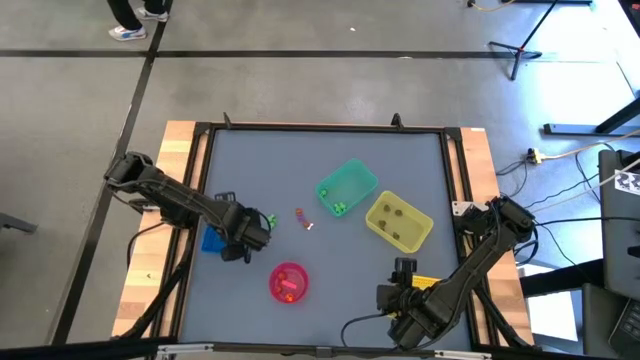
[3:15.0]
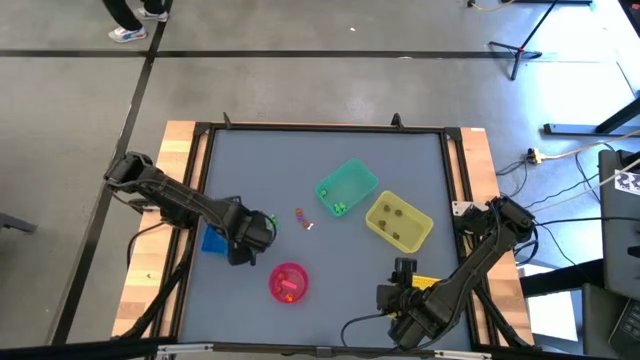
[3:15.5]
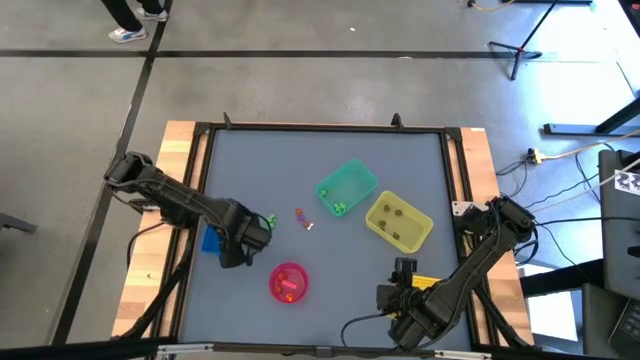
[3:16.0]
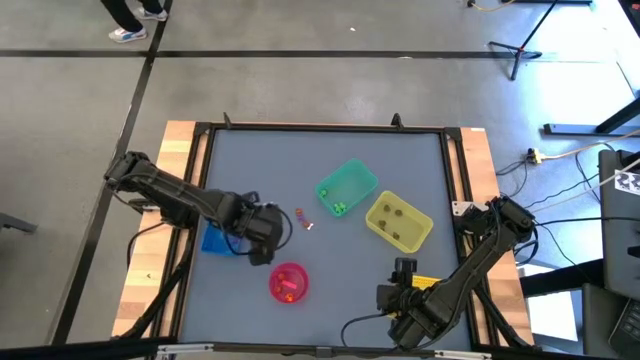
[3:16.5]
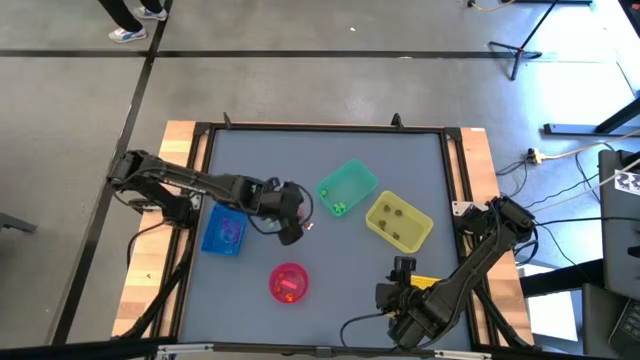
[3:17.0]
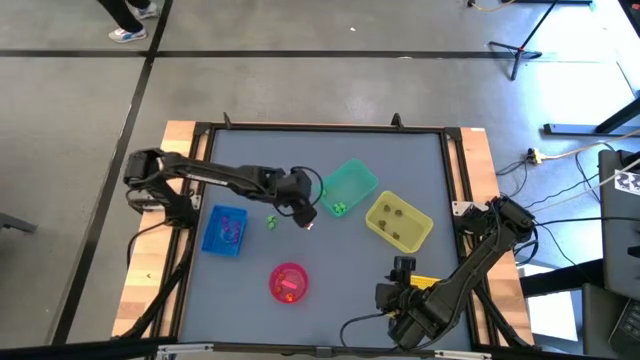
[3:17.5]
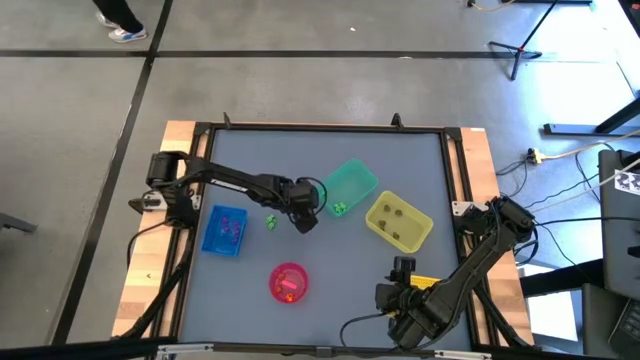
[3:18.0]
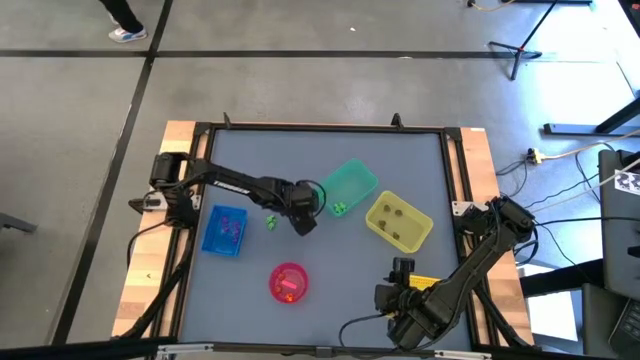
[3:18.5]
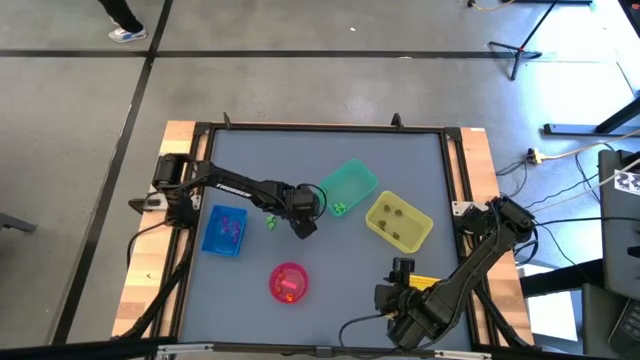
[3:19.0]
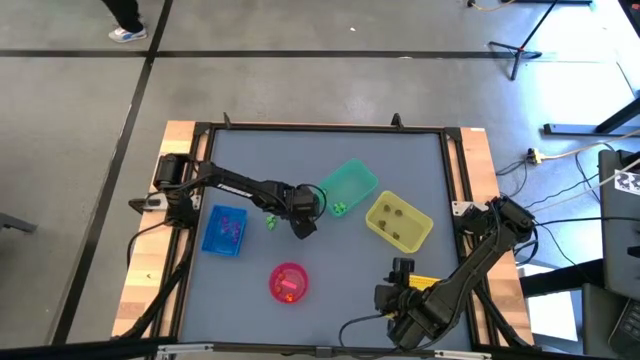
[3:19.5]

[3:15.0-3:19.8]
Task: Sort Halloween decoration
Put the orange pumpkin toy into the pink bin

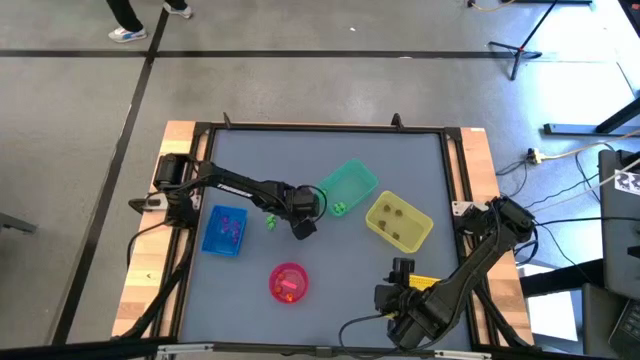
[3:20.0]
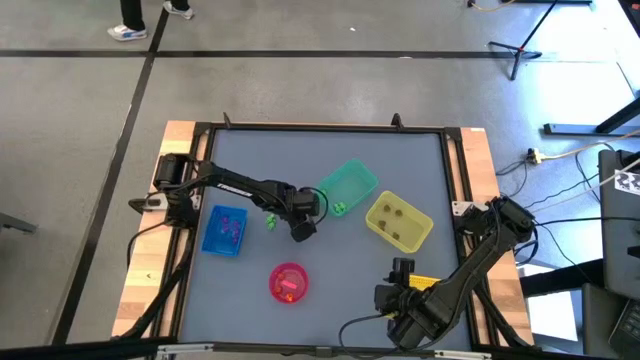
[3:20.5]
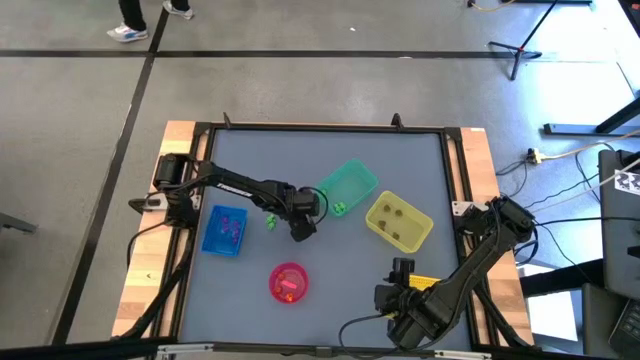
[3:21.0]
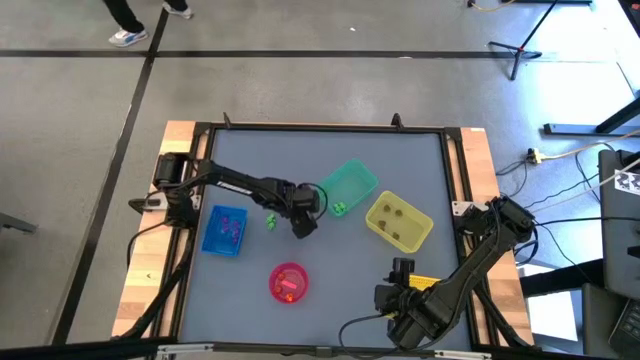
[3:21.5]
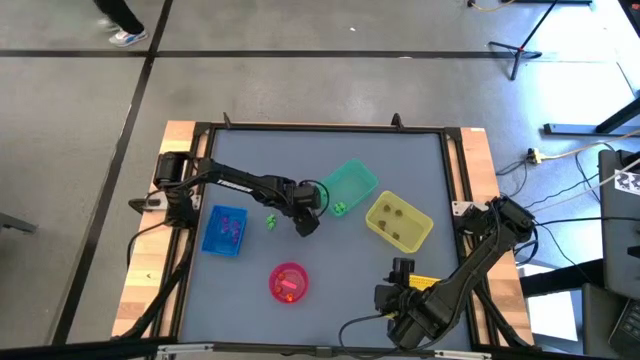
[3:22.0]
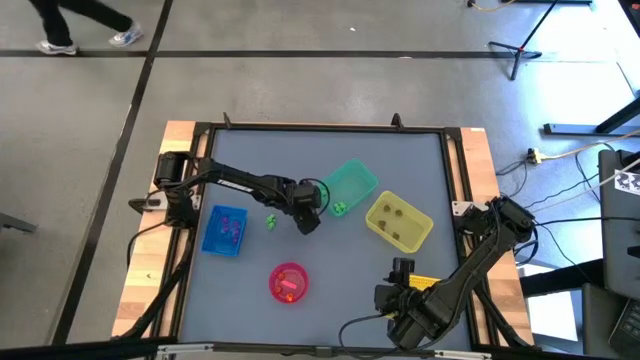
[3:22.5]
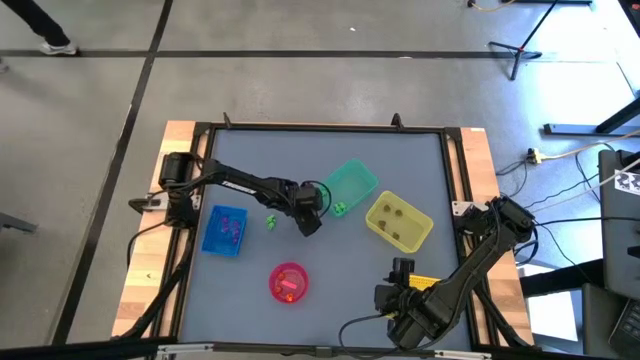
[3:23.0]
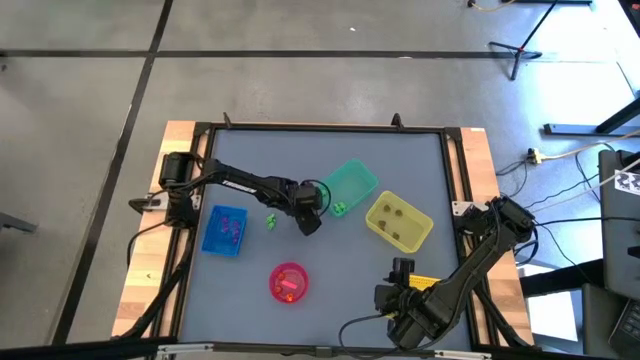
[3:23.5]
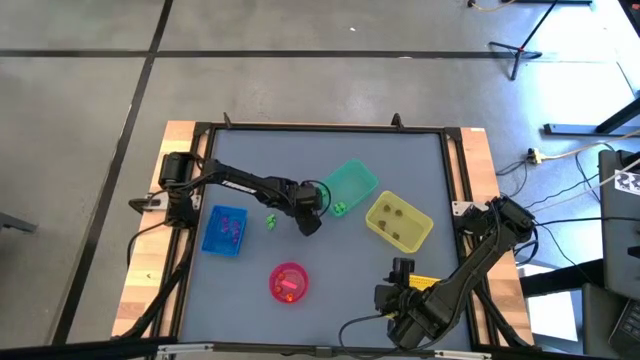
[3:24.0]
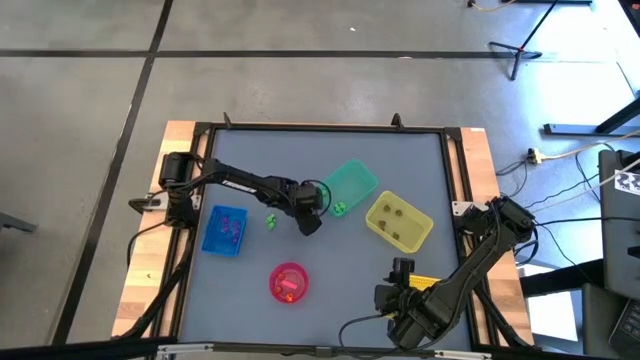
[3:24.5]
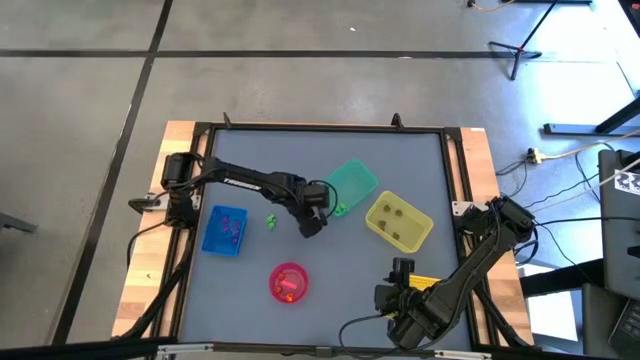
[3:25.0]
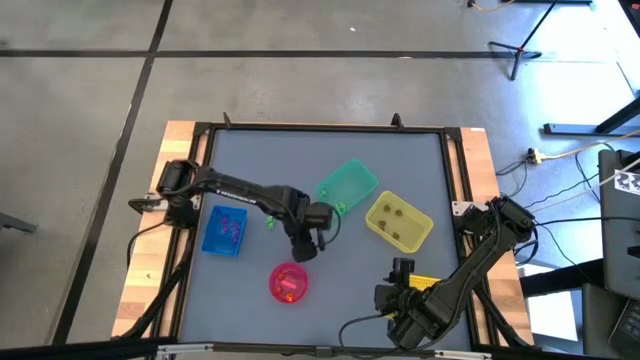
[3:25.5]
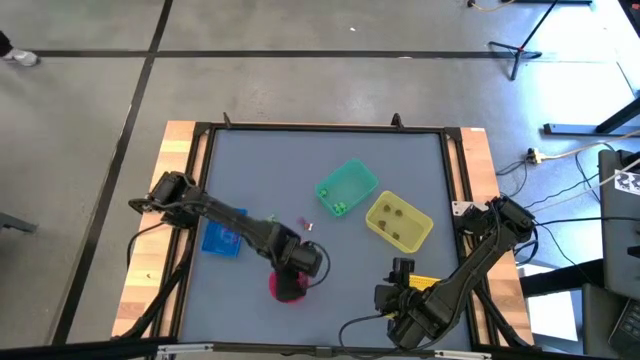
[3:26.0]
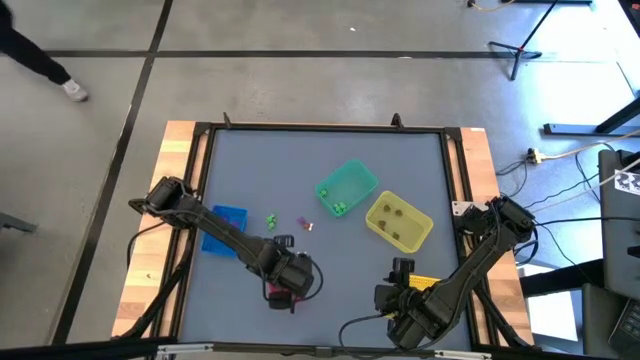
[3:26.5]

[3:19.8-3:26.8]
Put the orange pumpkin toy into the pink bowl

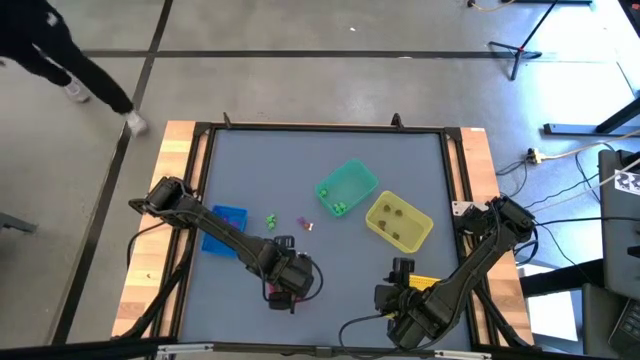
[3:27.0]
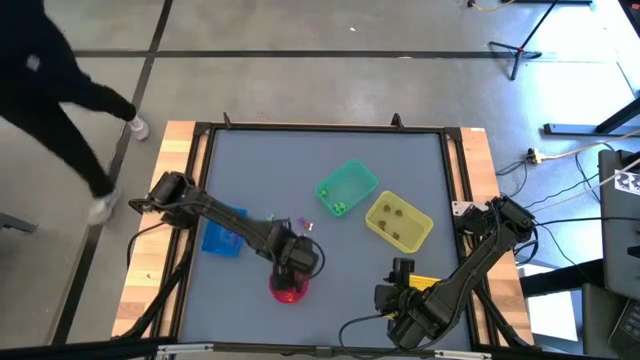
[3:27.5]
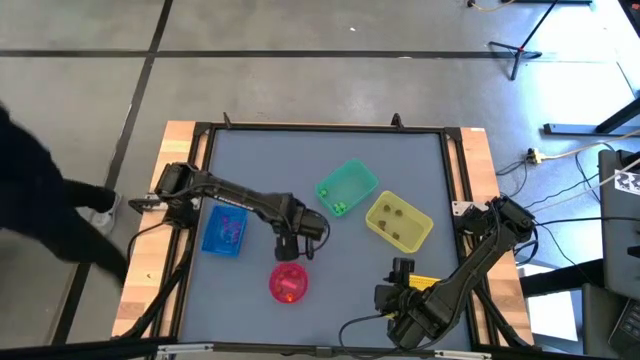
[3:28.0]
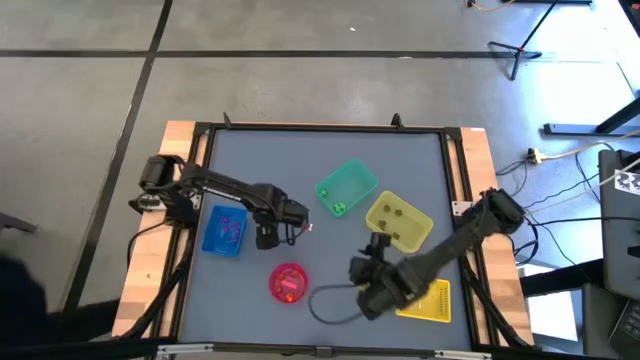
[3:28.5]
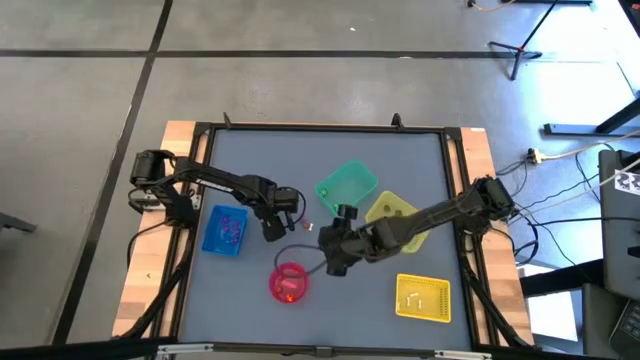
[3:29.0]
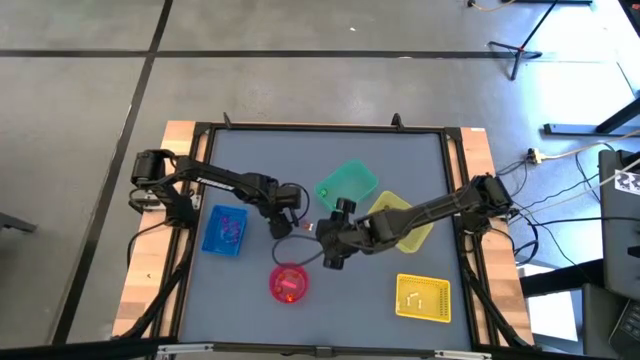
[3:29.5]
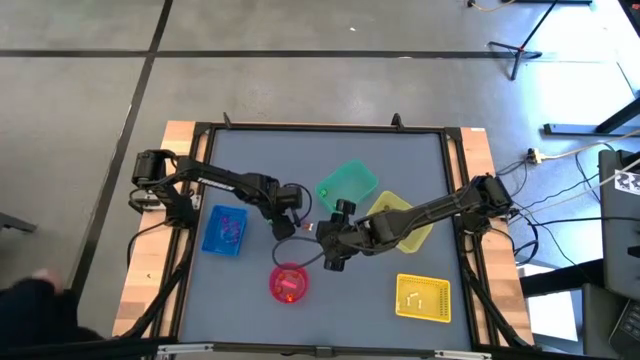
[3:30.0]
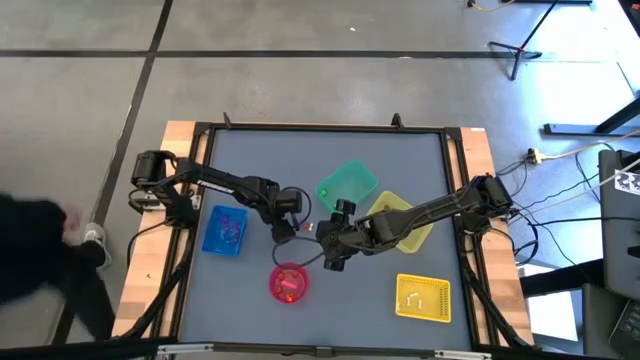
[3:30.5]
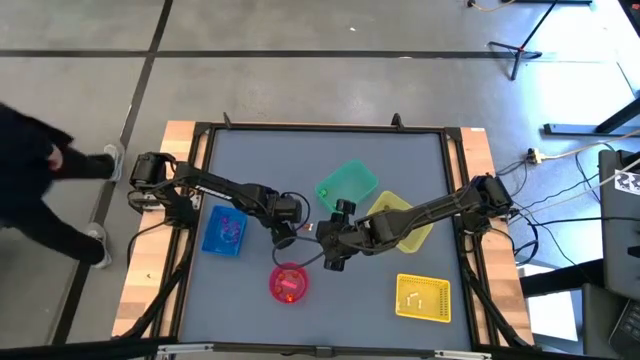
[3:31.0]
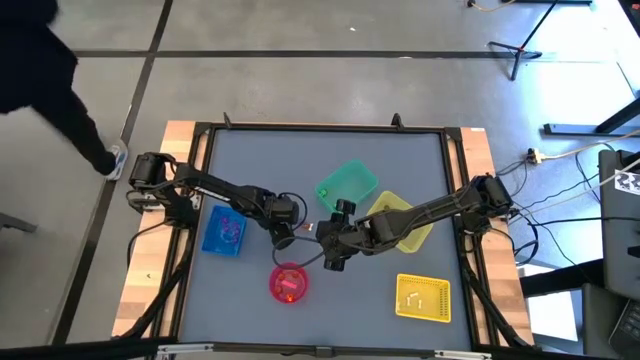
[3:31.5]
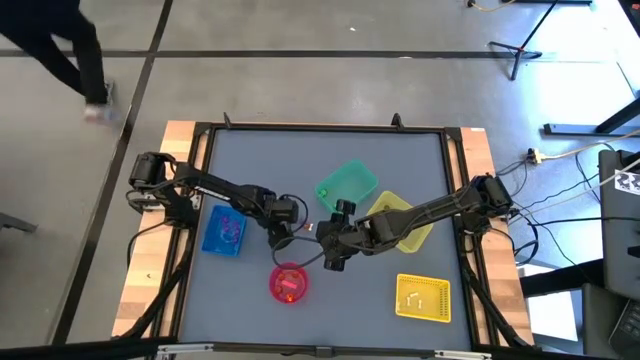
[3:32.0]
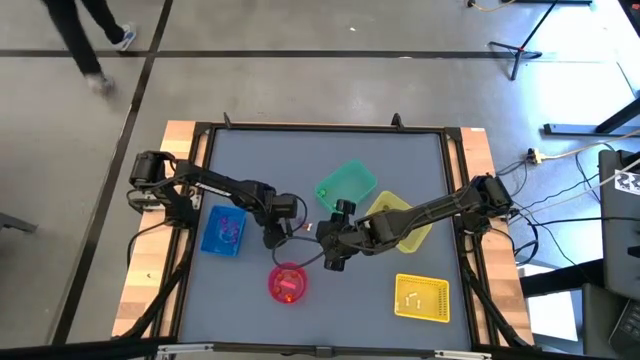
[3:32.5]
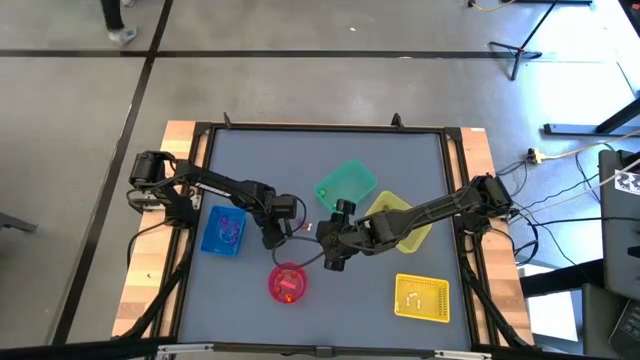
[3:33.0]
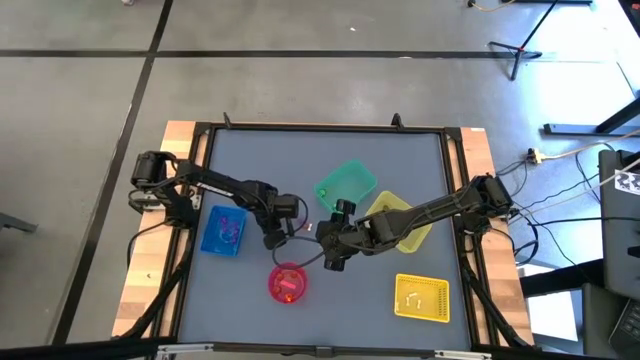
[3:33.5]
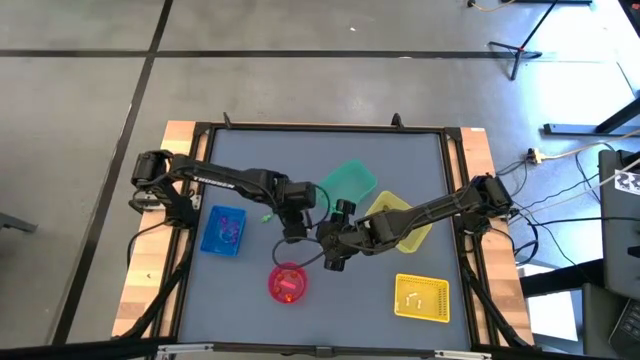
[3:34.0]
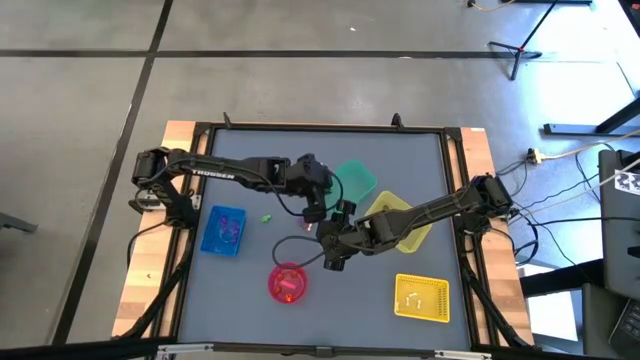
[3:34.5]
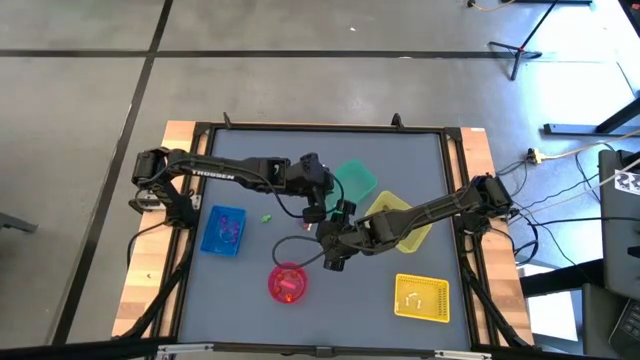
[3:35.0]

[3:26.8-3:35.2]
Put the green skeleton toy into the green bin

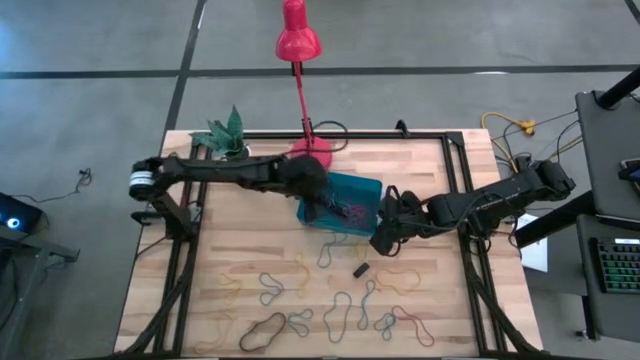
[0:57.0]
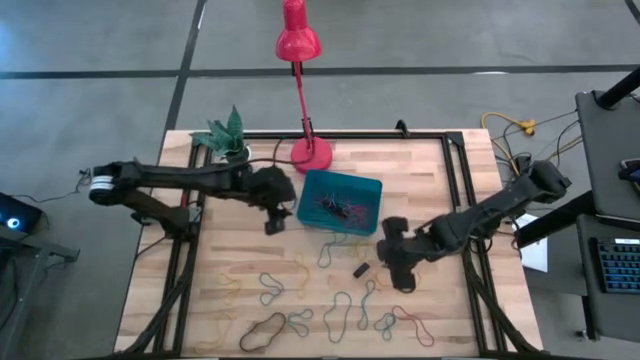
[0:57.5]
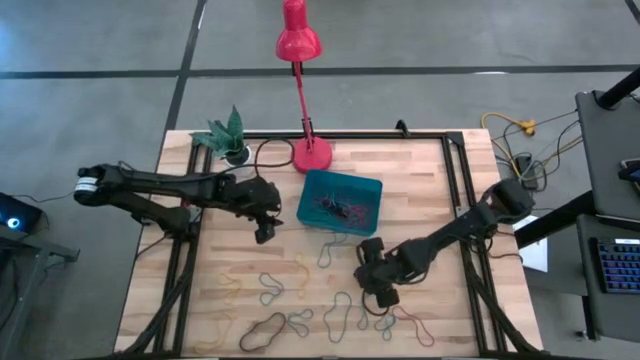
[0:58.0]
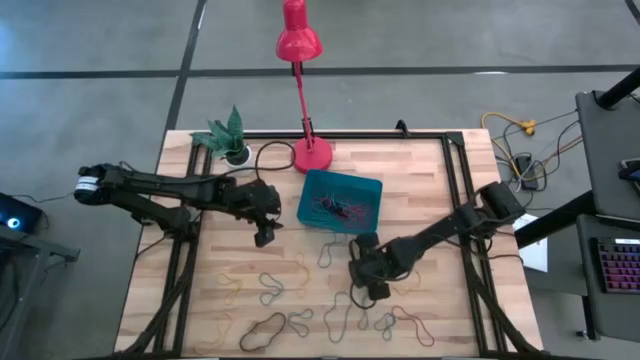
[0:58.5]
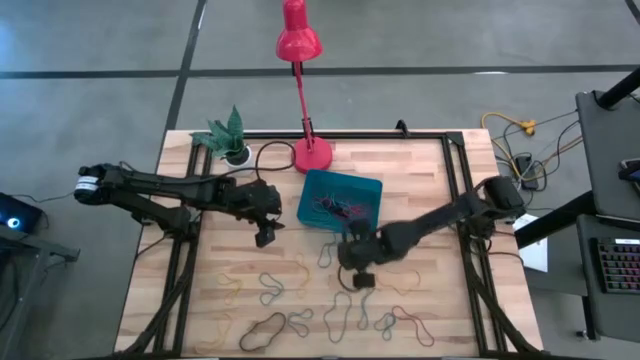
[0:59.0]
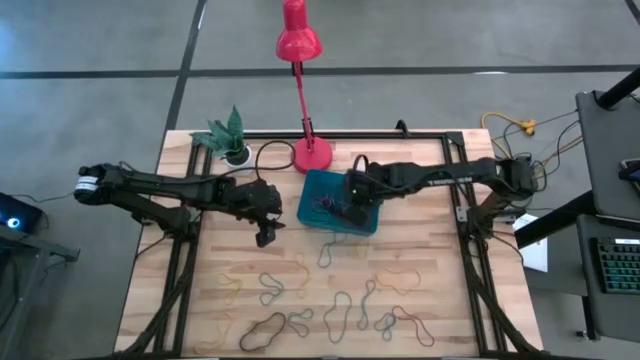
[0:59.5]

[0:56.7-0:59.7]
Task: Pick and place rubber bands into bin
Put the black rubber band into the blue bin
